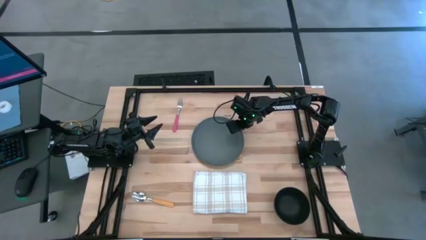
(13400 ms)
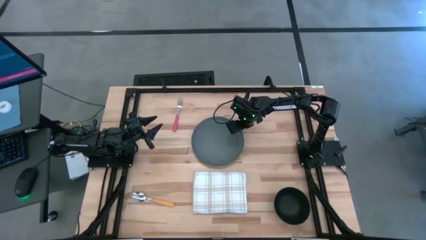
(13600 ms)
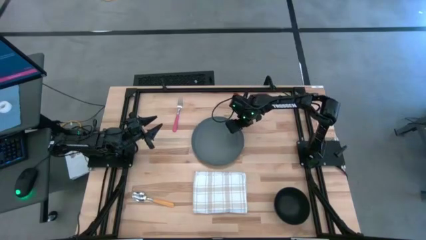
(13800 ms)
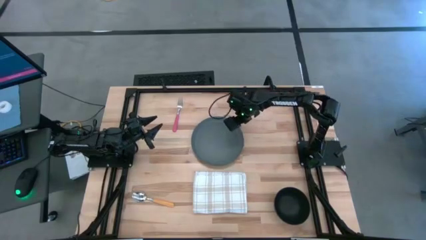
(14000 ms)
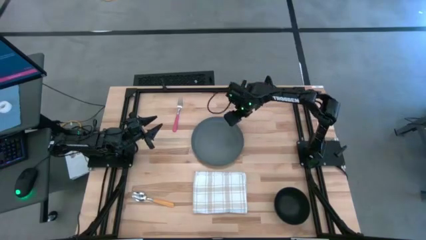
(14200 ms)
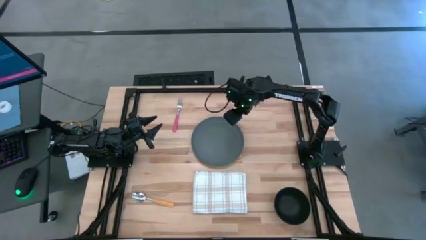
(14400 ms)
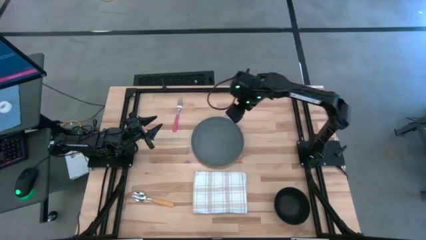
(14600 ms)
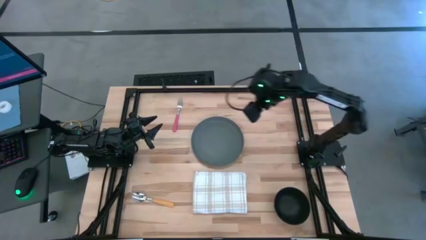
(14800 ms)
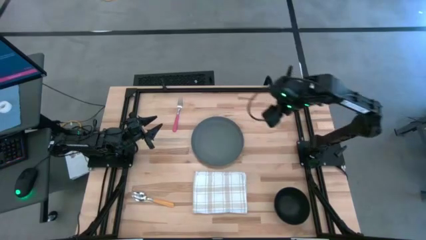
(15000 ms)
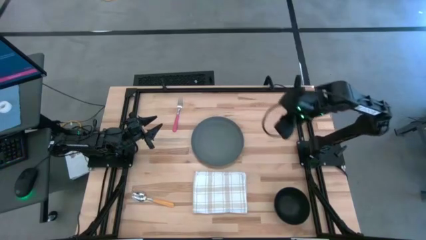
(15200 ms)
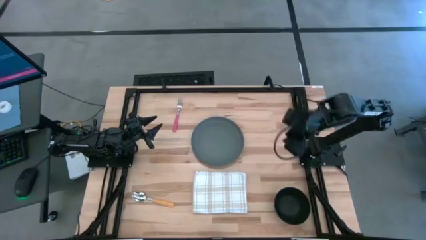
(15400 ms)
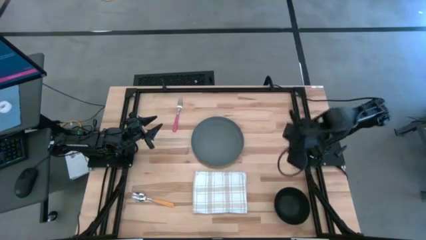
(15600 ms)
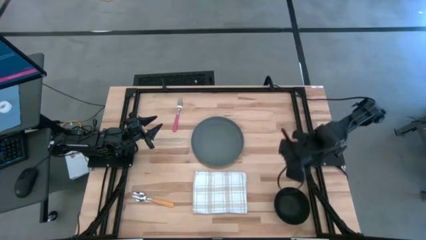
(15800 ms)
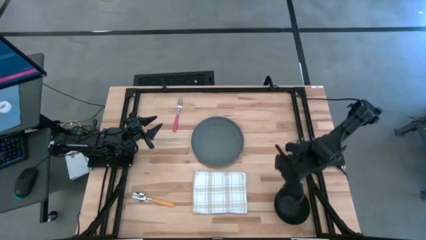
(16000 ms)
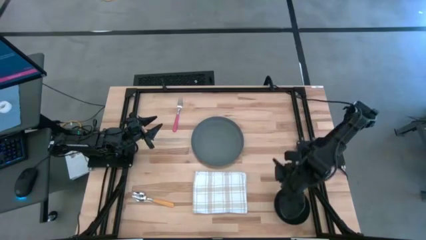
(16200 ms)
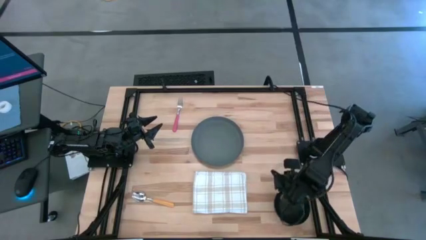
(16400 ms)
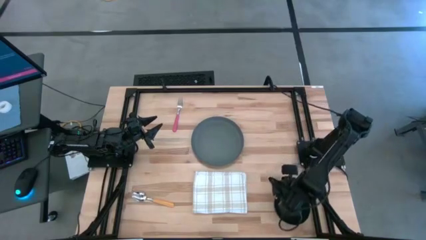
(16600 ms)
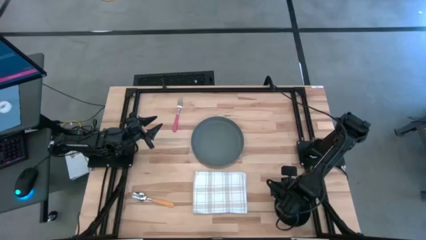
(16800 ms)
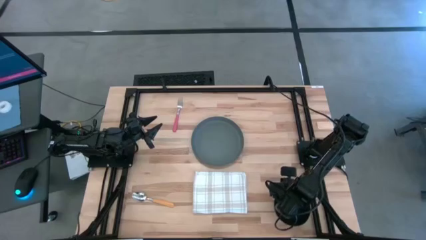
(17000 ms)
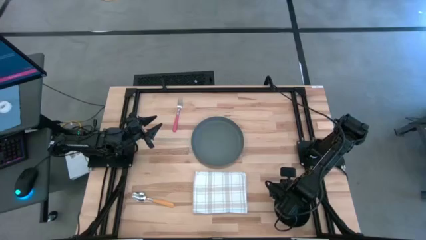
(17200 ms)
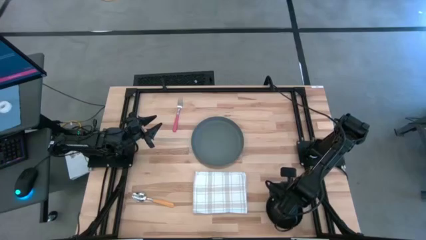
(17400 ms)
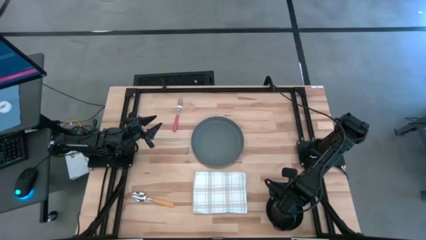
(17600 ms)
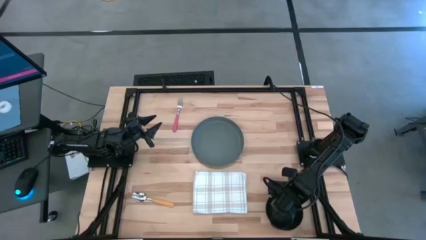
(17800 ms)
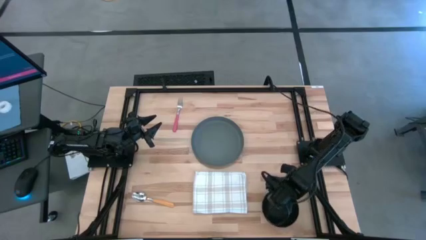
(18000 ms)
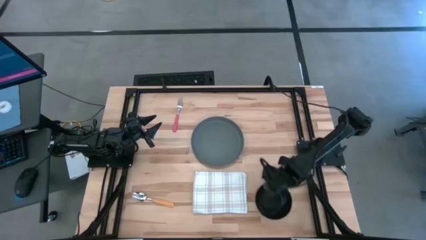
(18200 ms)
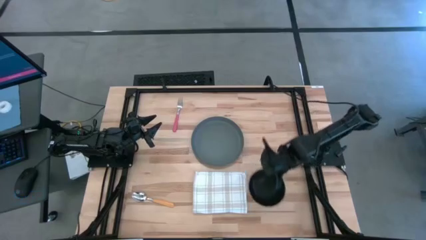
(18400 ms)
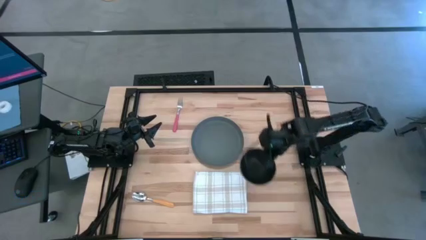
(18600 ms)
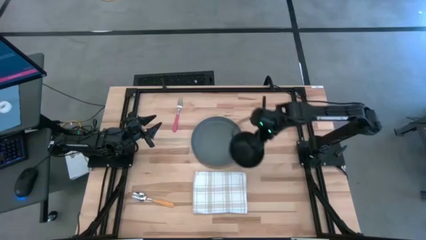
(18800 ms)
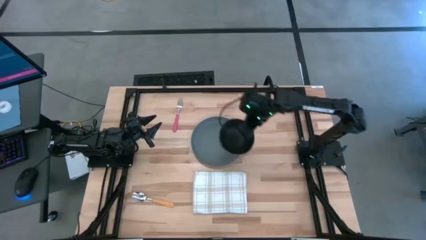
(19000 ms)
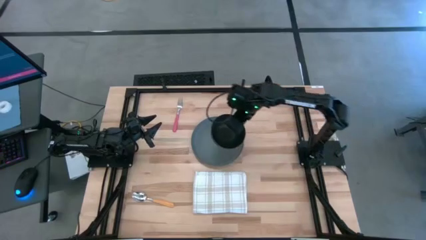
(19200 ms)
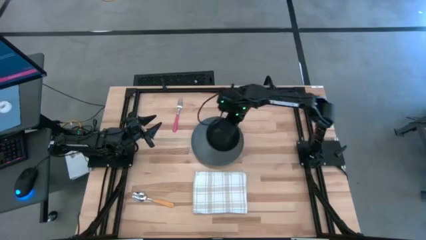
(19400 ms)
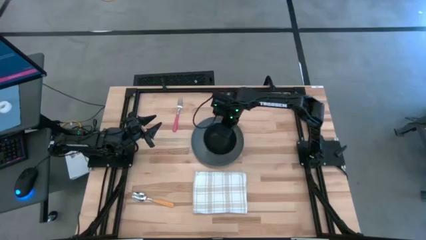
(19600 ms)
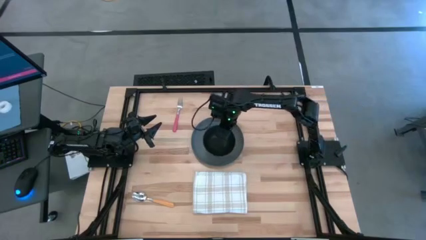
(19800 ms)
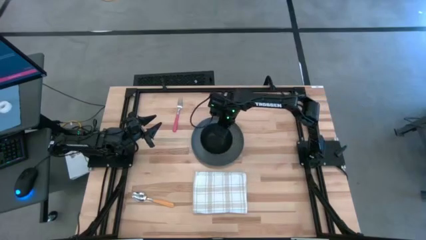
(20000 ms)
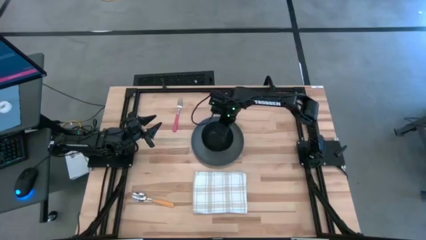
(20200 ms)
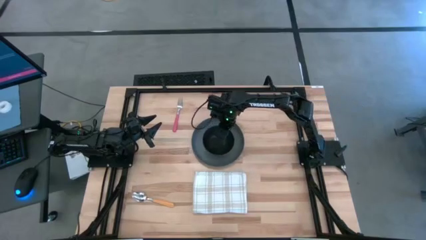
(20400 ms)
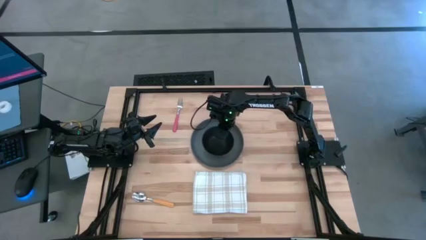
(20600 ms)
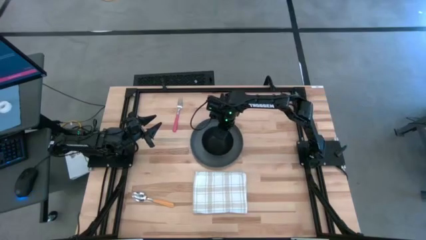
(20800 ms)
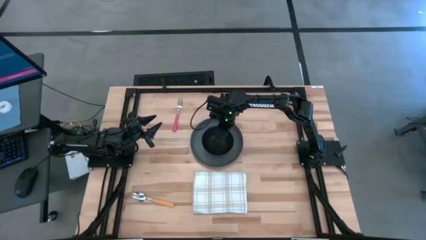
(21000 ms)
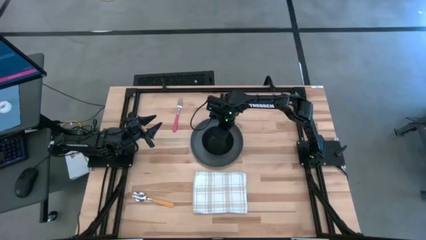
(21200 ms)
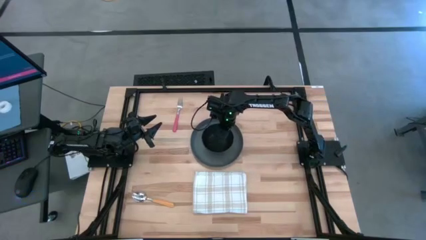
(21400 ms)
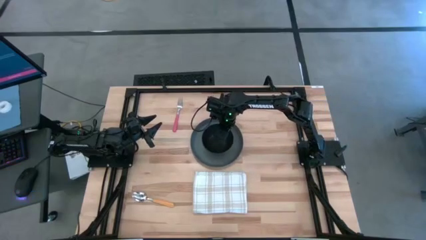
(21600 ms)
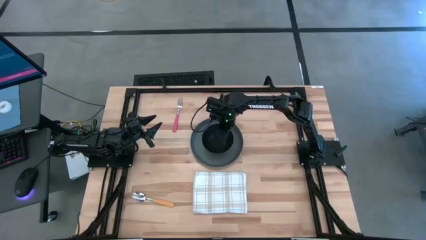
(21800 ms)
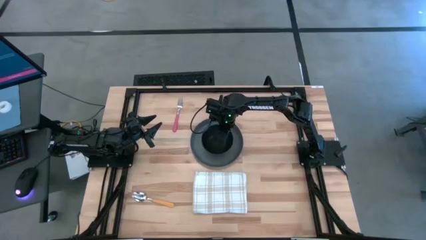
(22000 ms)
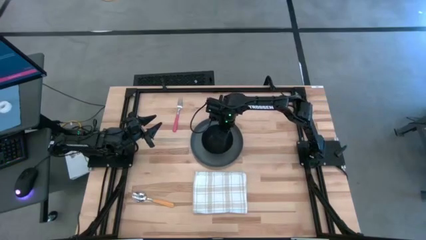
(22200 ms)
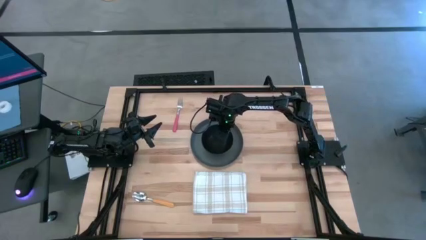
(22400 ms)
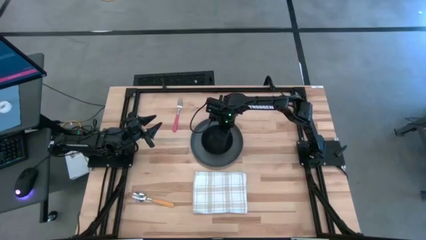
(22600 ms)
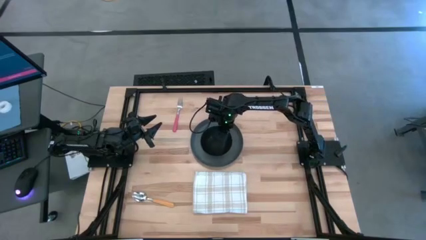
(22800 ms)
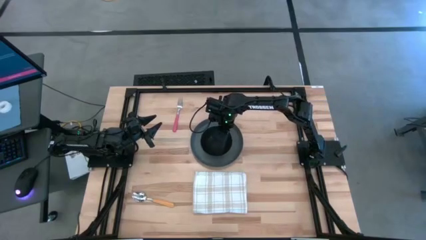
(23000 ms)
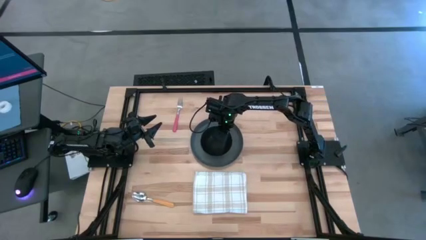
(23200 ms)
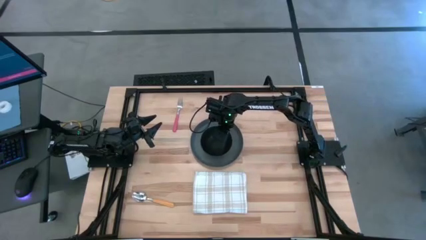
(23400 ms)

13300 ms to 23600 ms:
Task: Set table place
Put the black bowl on the gray plate

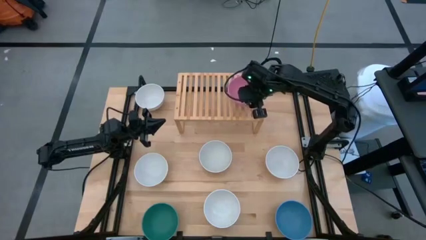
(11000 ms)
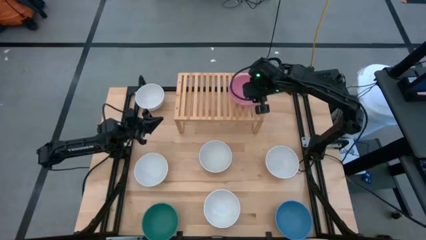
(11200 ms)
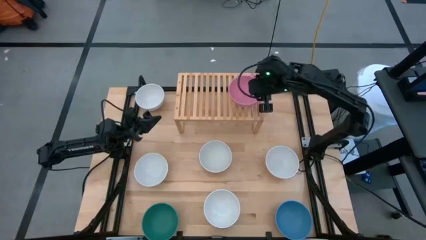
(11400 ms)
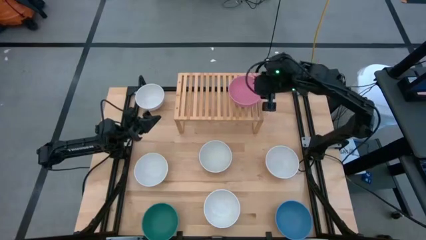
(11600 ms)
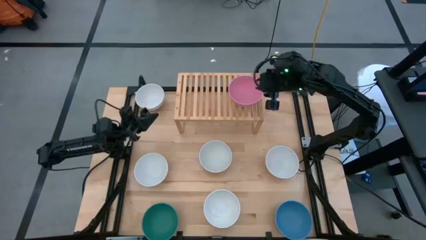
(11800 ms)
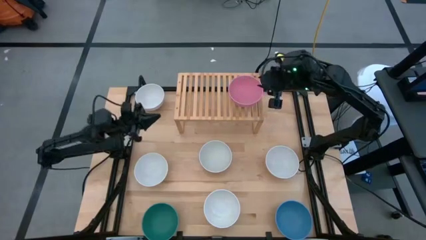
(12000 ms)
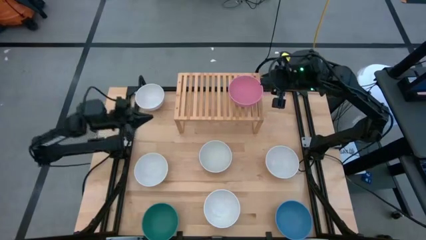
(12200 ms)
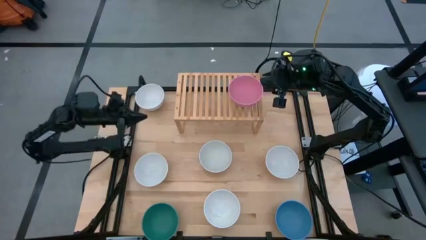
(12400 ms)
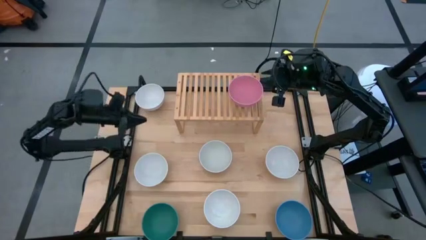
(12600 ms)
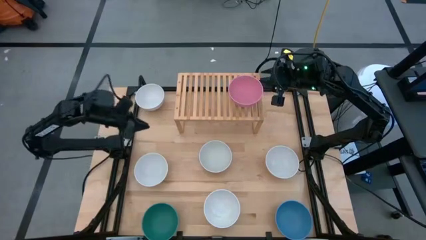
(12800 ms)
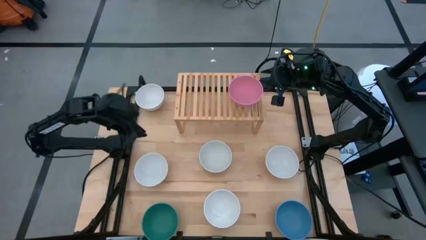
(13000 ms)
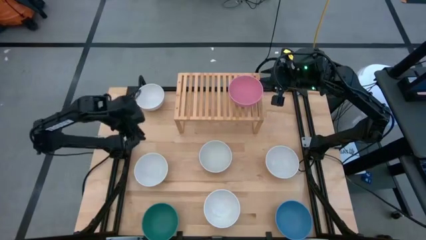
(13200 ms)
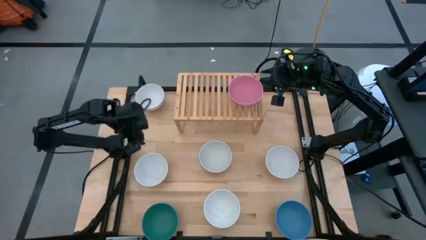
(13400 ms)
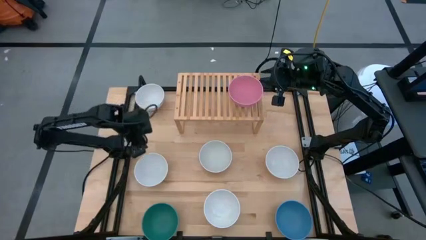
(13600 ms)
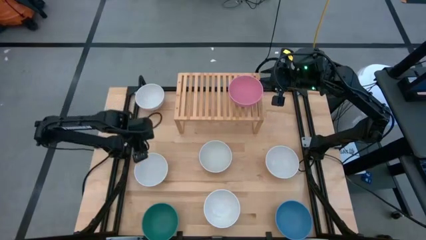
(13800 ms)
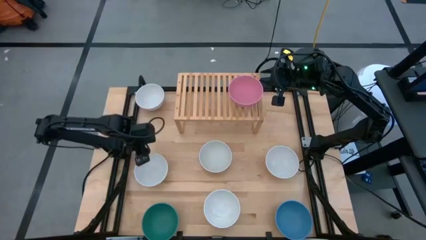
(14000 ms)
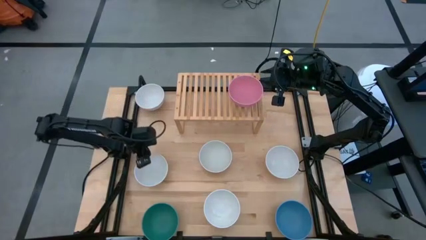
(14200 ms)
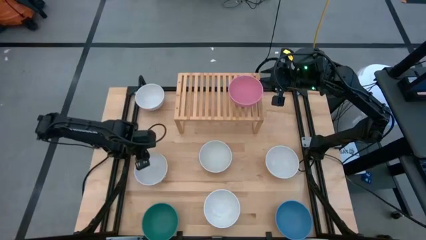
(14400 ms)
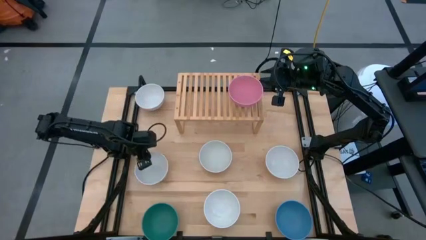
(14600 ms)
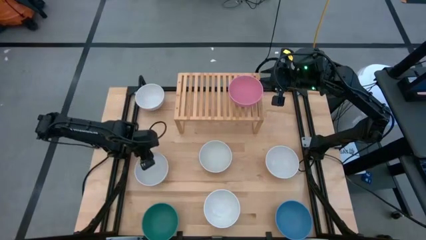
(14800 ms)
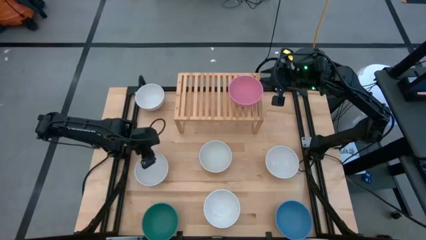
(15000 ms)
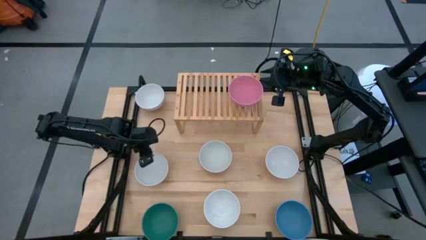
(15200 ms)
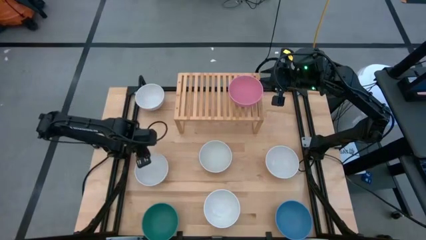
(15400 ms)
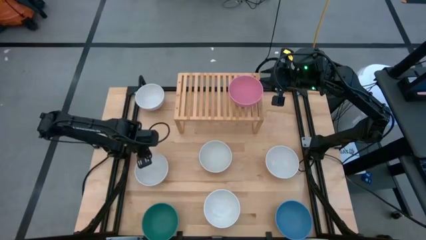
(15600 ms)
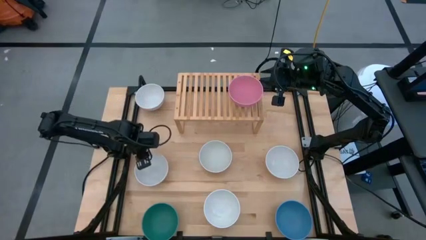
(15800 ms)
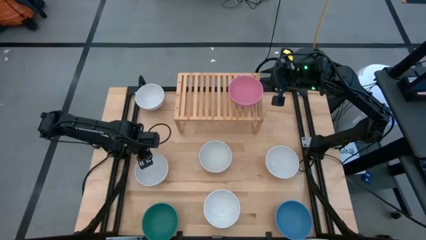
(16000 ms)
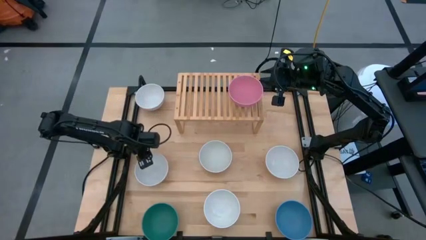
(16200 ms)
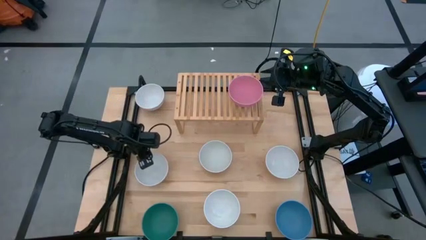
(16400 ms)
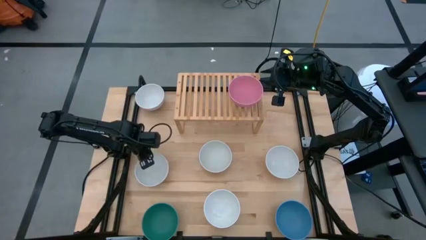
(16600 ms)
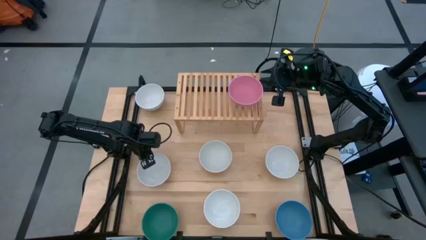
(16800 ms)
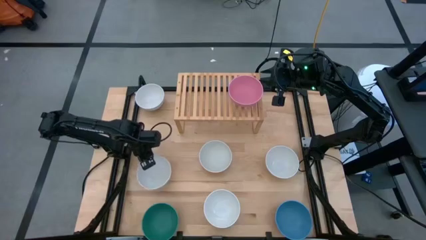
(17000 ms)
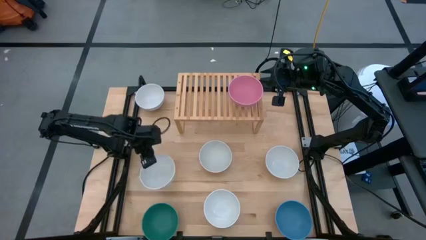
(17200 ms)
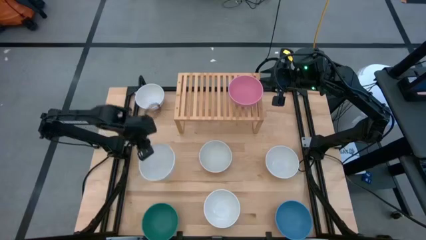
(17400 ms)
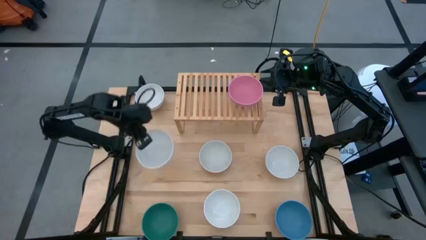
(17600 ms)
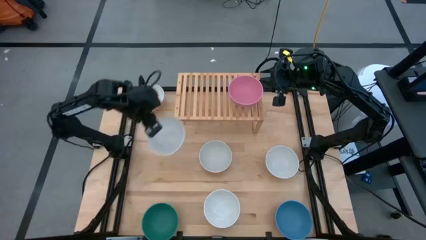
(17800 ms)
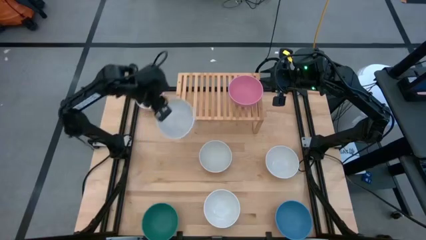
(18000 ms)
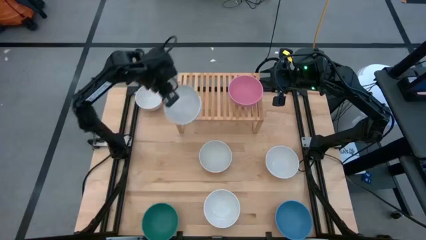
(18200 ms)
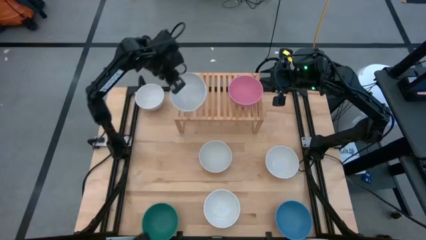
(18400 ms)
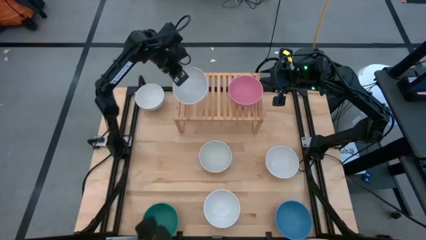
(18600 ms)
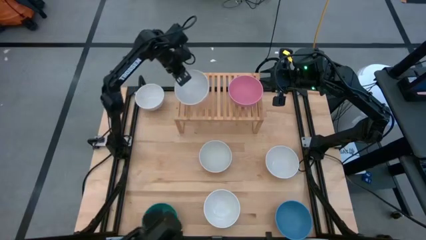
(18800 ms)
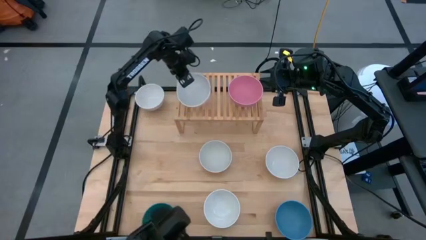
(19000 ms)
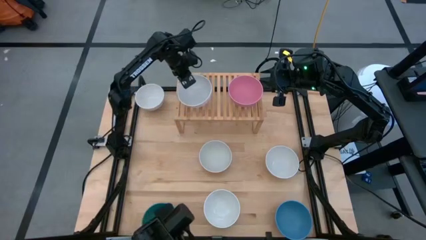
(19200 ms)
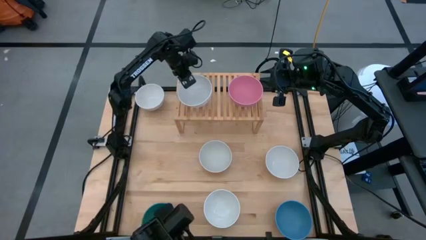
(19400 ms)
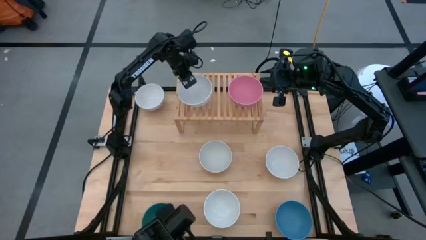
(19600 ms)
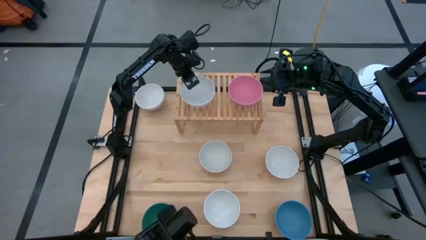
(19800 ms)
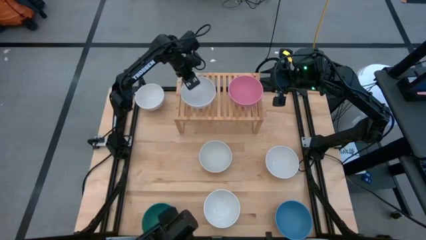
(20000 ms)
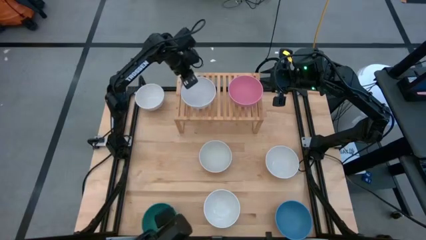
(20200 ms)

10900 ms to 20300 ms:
Task: Place and stack bowls onto a shelf
Put the white bowl on the shelf
